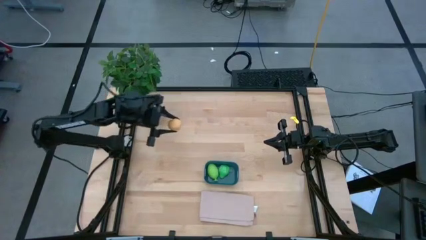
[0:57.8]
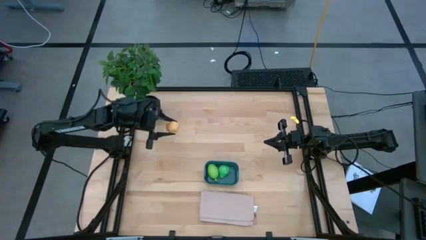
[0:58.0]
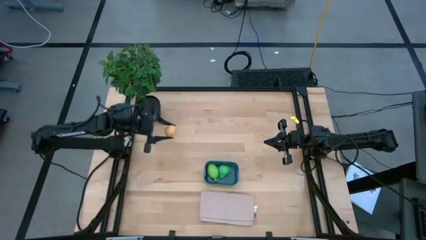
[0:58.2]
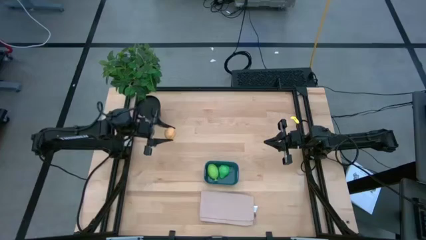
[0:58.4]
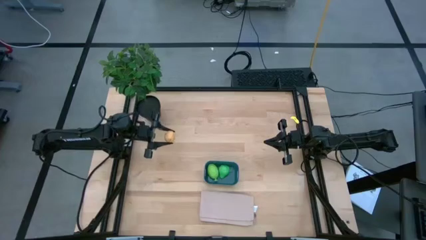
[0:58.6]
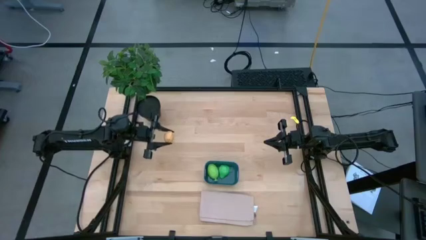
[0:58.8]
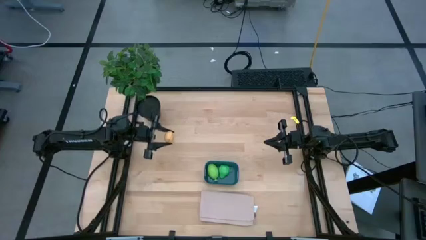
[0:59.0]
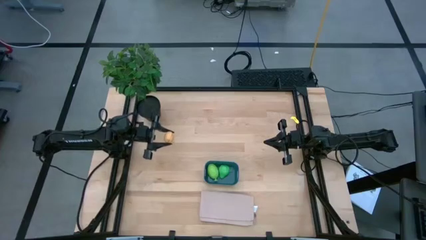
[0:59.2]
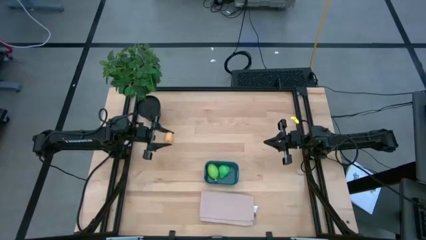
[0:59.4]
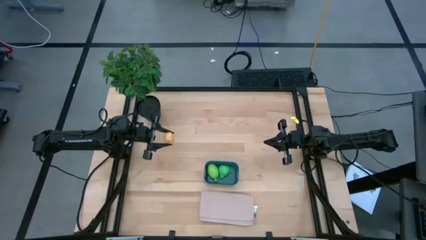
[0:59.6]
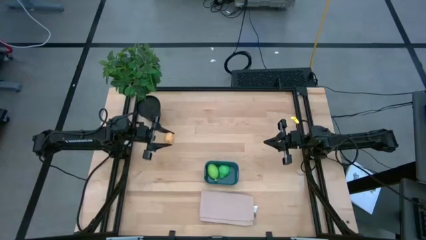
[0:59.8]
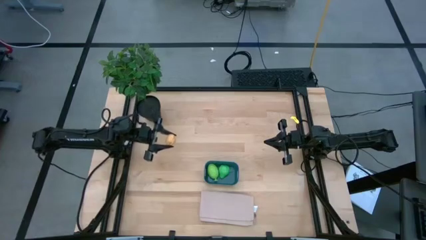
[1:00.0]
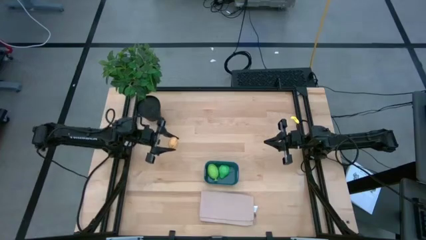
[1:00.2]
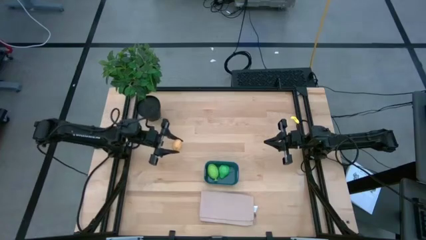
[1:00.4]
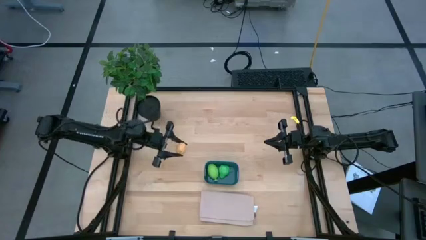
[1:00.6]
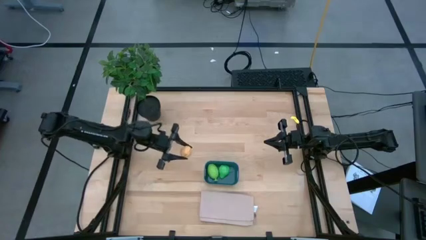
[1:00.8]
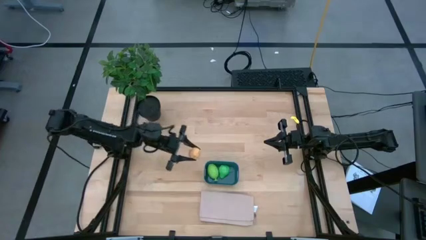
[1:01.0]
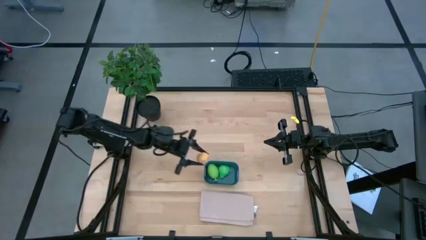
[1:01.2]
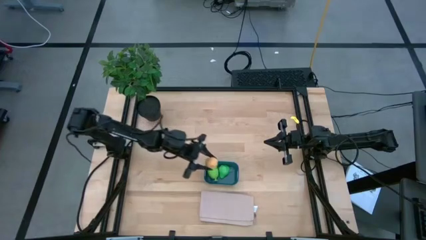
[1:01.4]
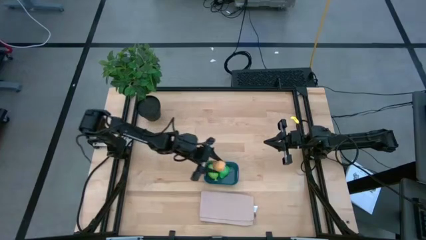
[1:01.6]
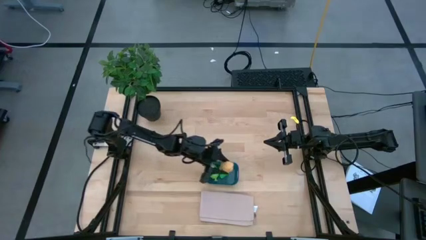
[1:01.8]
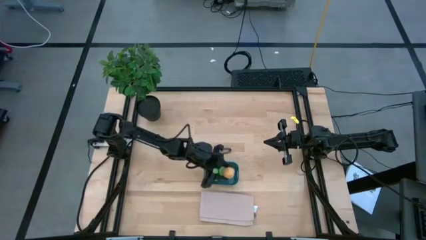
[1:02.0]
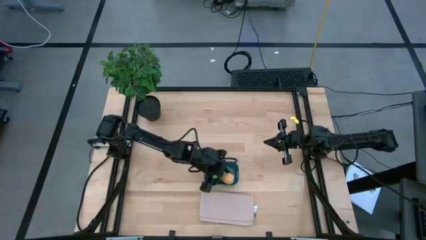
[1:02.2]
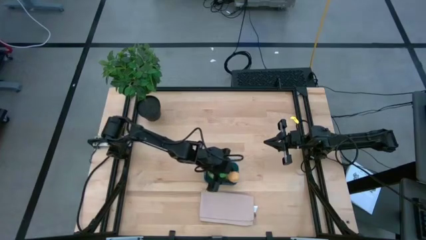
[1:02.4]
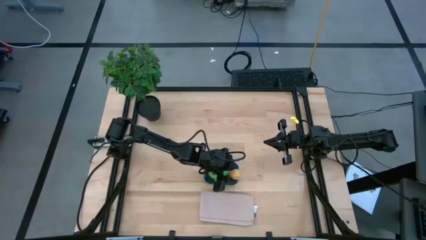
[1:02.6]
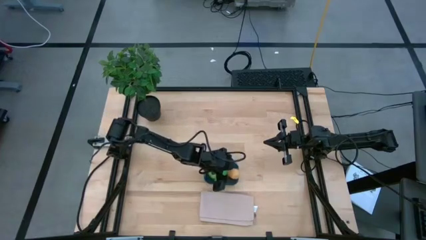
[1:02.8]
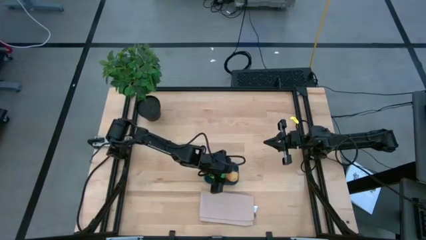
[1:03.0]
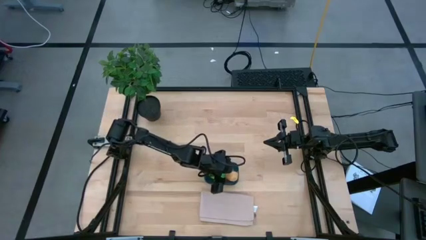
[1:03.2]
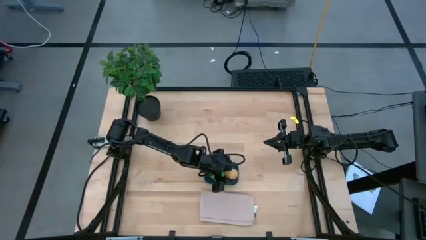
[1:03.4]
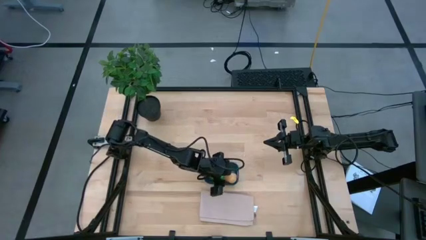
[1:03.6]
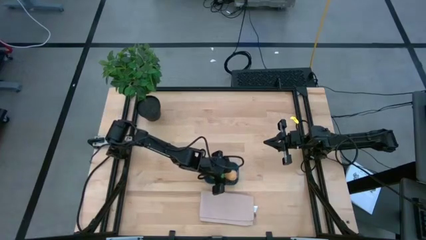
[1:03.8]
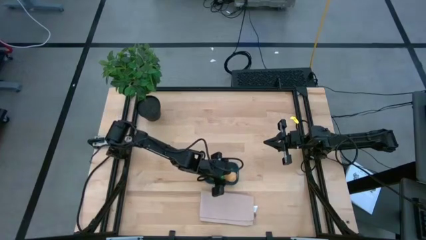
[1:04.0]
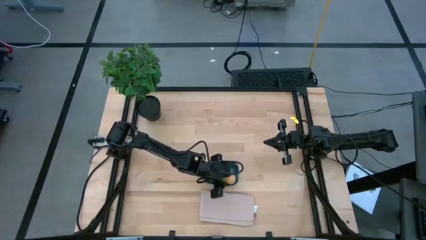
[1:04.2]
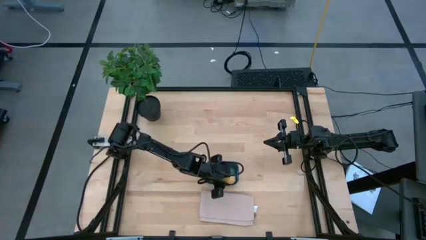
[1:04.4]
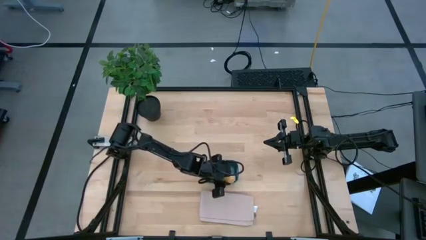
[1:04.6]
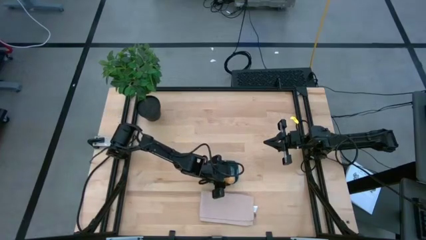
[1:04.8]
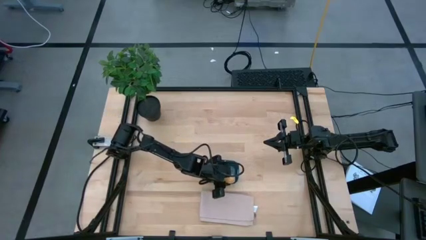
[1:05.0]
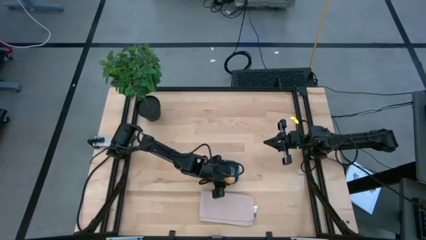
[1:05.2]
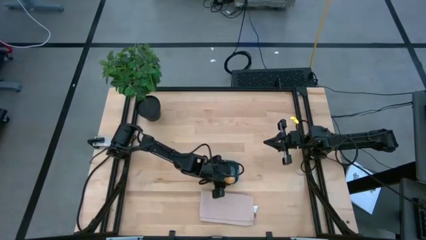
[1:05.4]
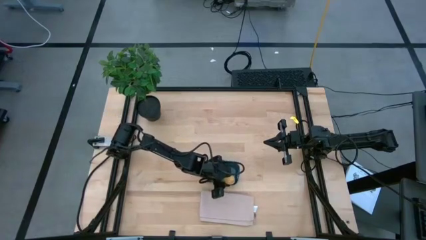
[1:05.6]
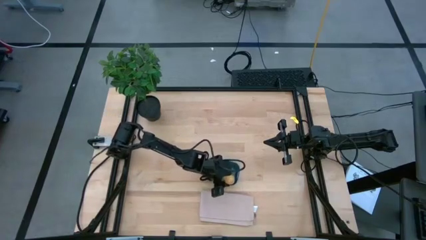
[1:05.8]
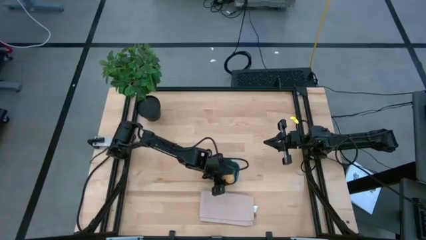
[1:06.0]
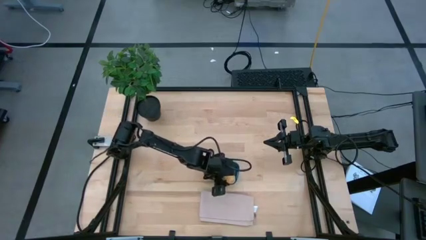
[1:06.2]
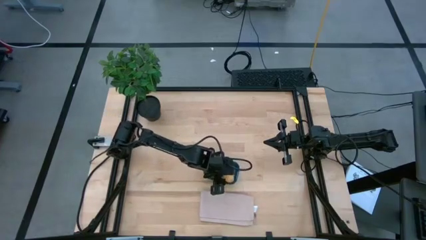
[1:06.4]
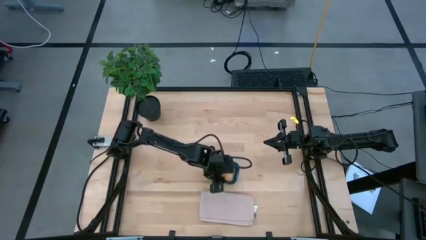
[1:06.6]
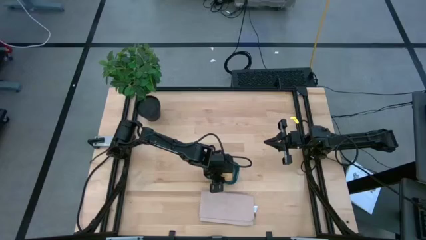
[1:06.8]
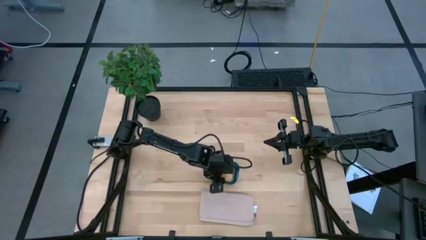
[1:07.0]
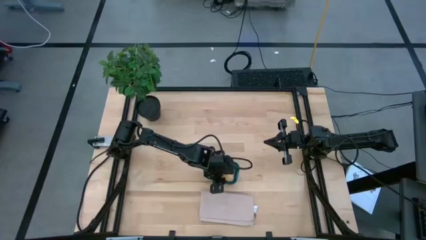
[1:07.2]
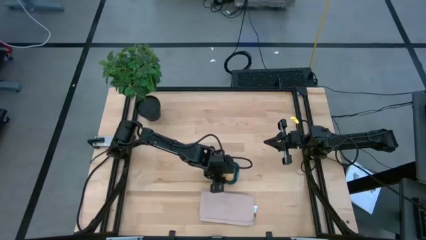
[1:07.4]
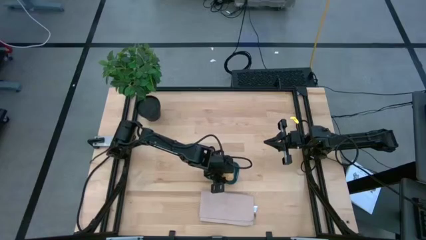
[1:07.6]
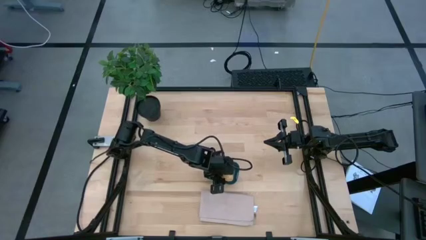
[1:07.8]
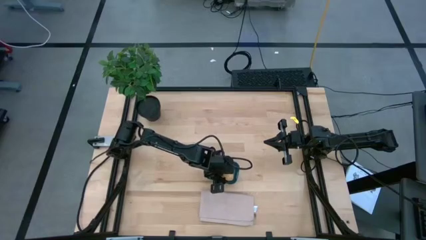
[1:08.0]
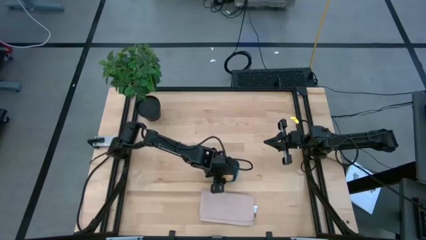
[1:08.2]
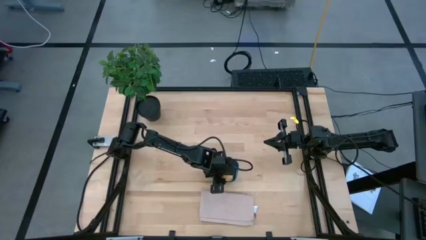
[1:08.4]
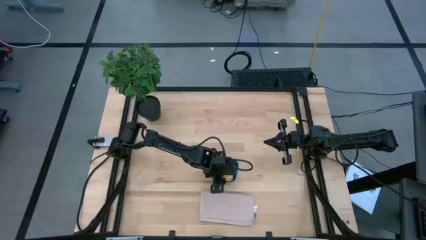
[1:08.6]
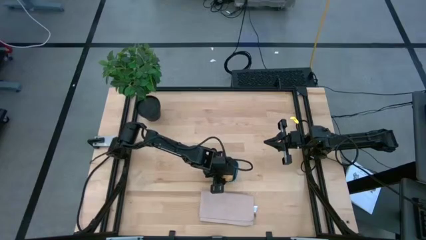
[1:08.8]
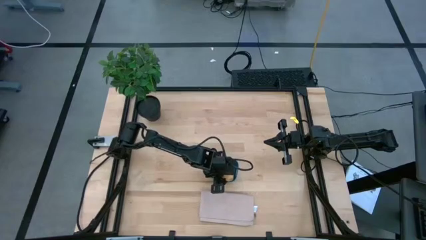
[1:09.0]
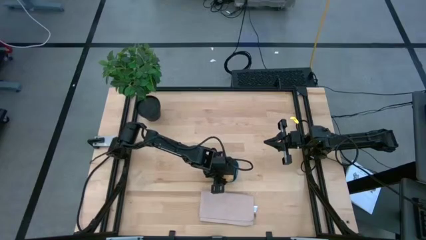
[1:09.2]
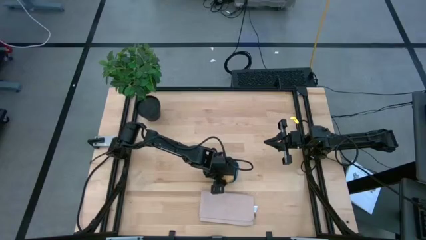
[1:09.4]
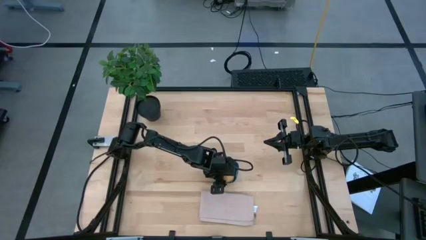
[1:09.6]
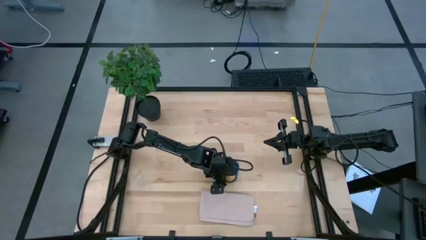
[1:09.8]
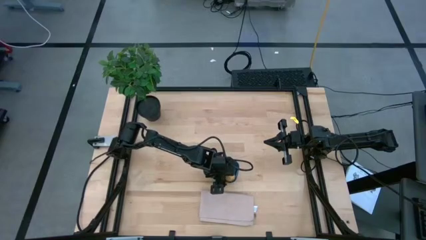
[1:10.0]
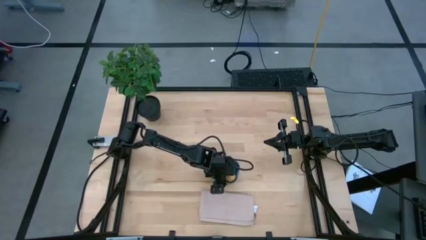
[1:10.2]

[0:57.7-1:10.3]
Task: Pick and placing Produce into tupperware
Put the brown potato into the blue bin
